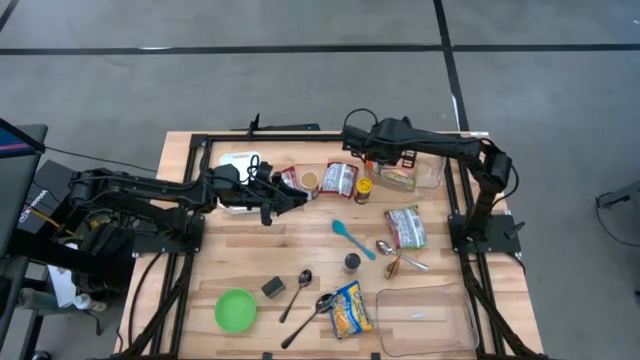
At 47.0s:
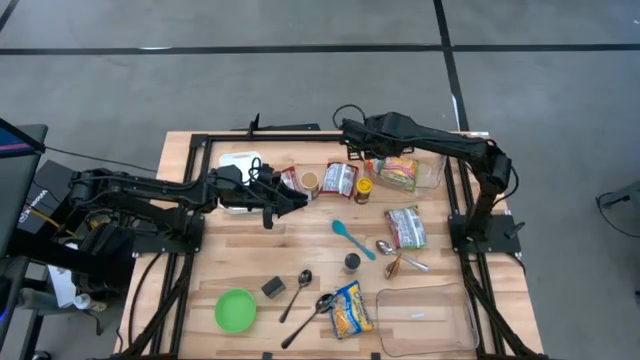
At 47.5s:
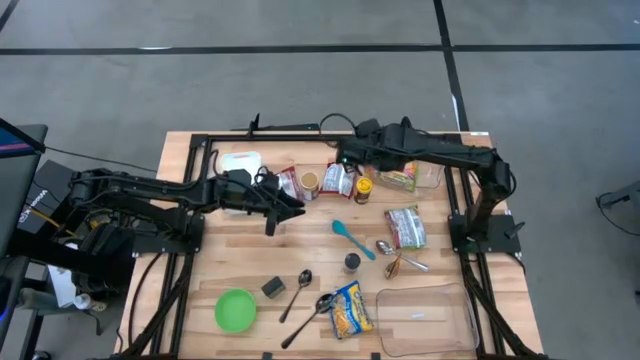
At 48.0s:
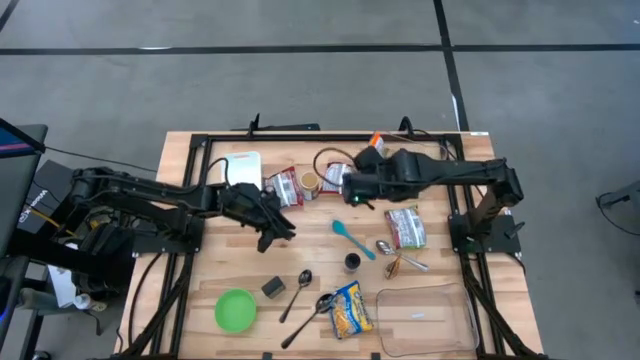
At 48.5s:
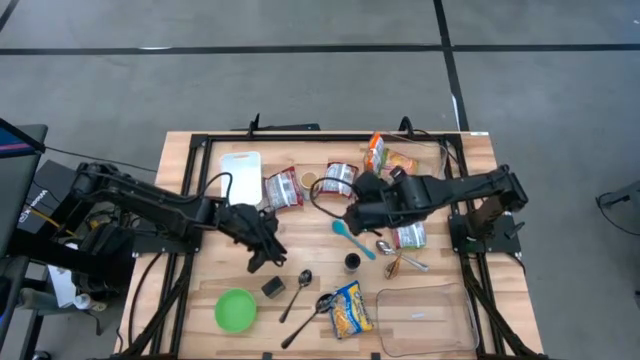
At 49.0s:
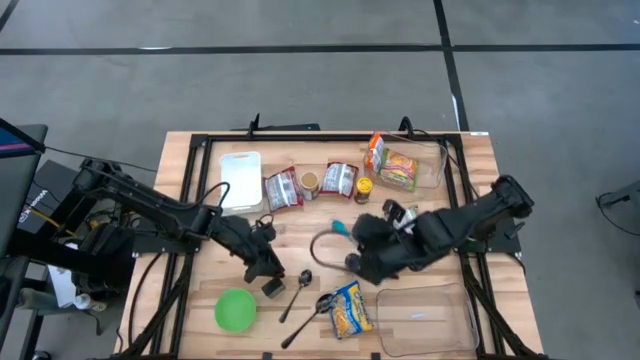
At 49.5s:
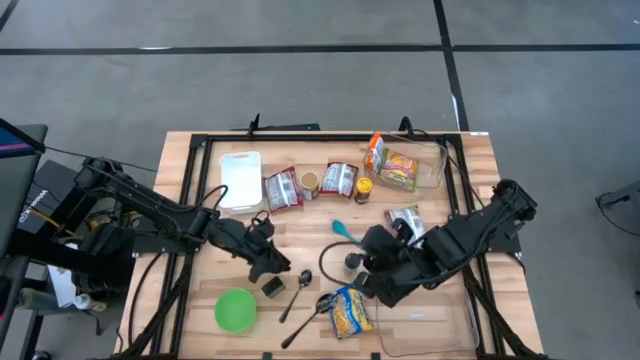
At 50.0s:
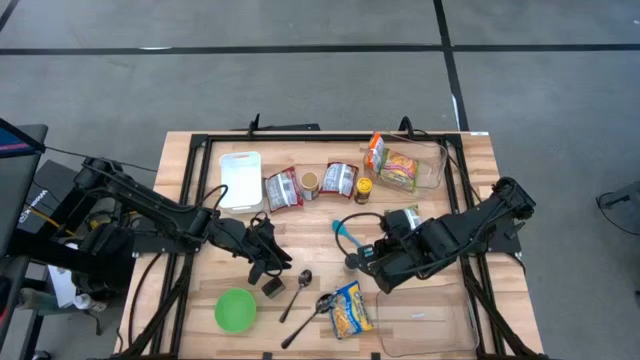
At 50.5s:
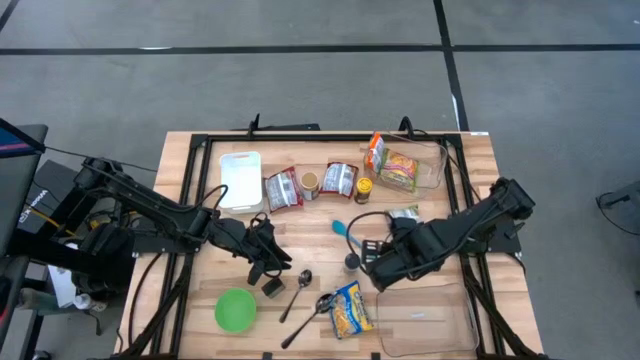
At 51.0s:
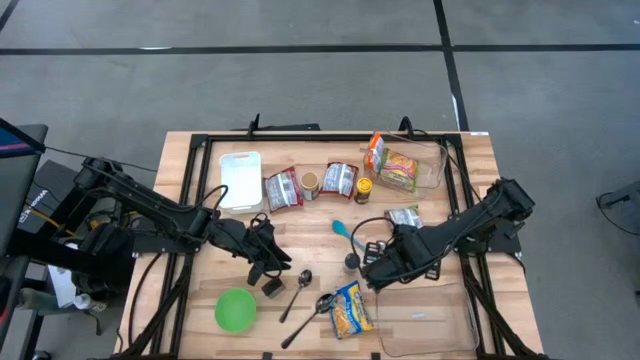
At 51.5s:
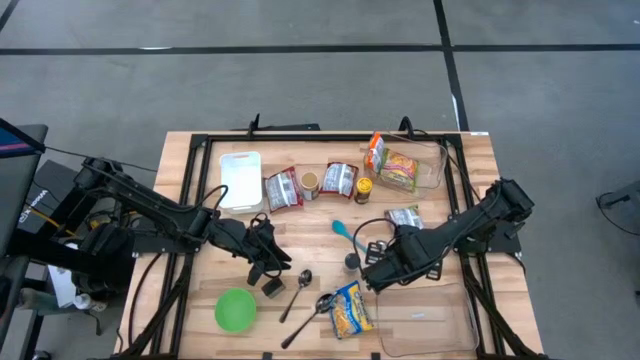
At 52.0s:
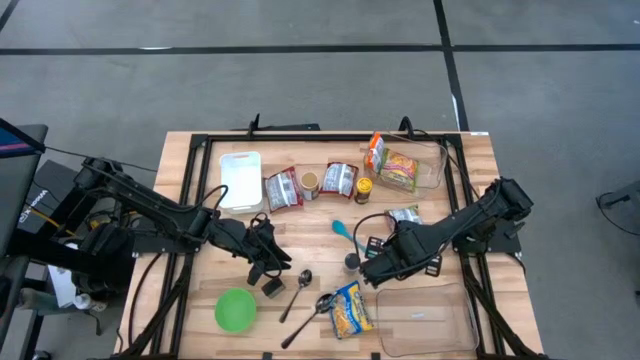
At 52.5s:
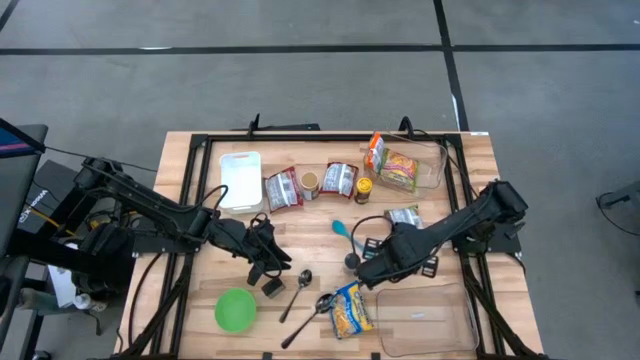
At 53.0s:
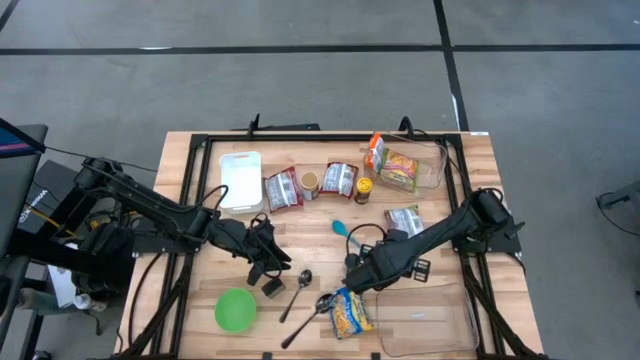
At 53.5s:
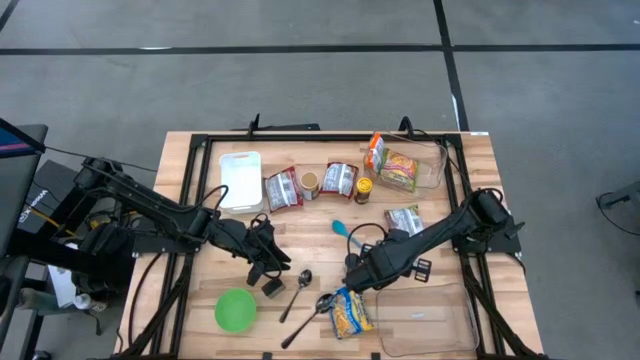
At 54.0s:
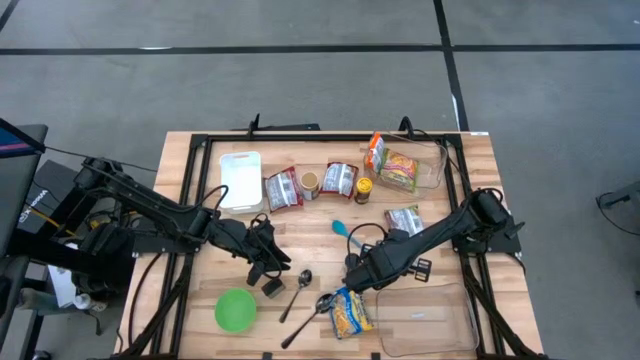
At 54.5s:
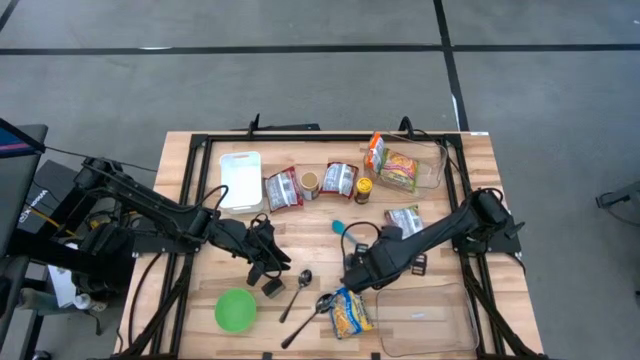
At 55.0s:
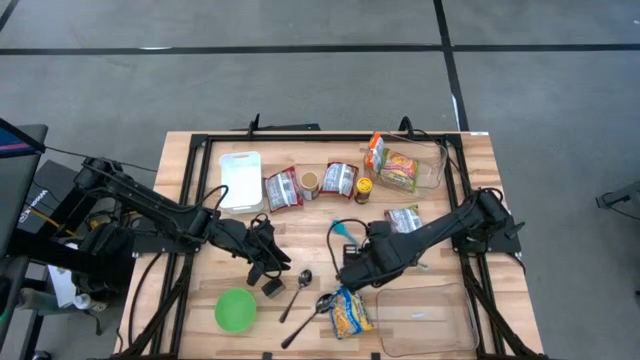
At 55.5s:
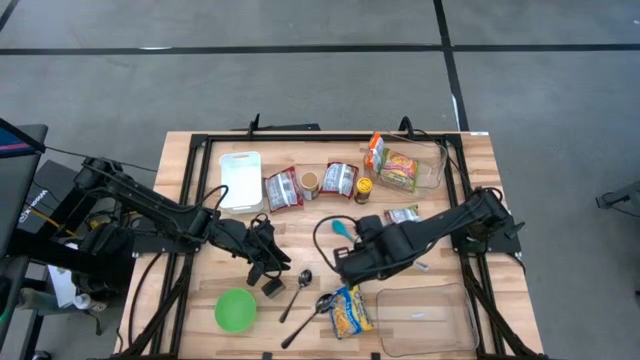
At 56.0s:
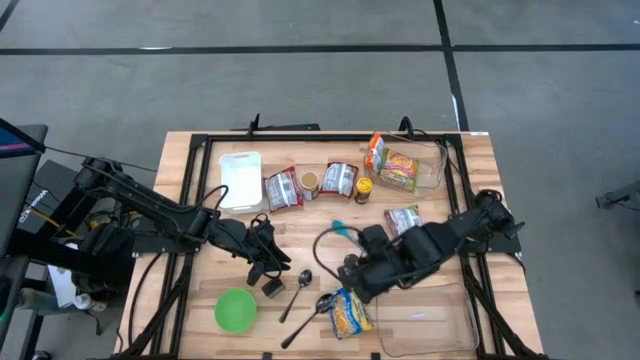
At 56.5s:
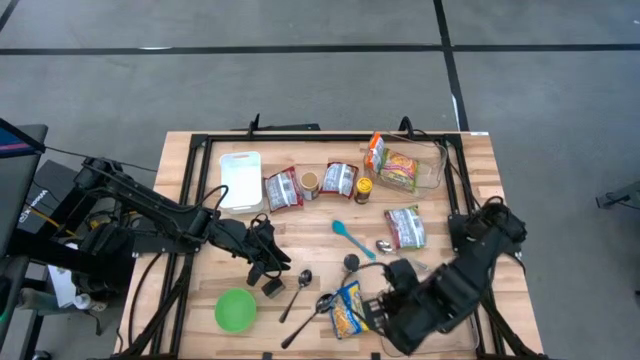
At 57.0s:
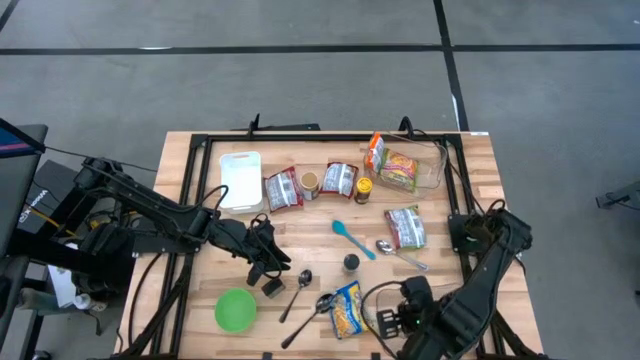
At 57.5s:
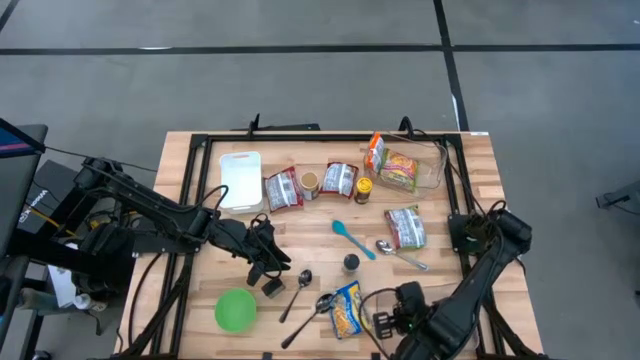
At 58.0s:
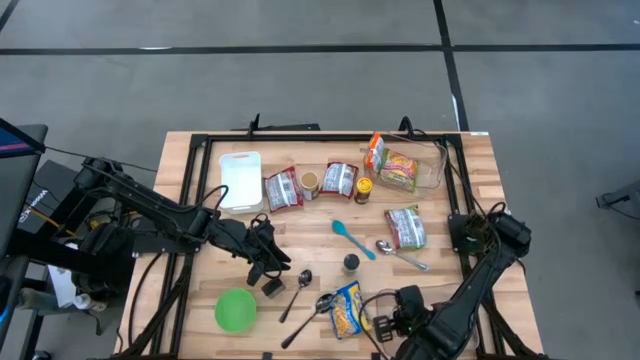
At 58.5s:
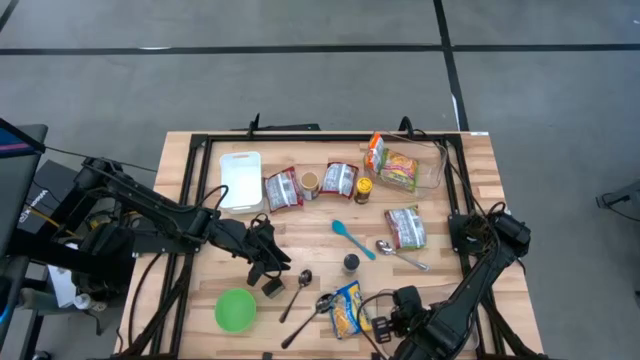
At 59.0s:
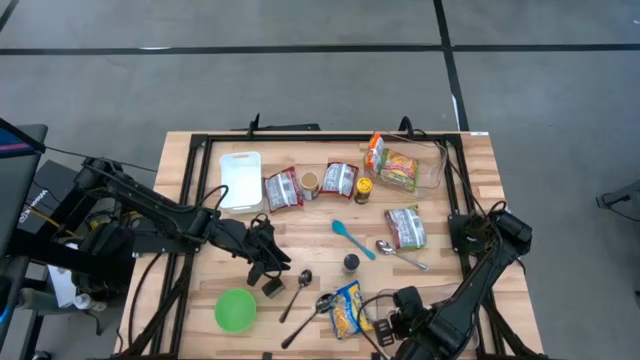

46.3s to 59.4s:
Task: Pick & Place Food Item
Put the orange spice pack into the bottom transparent bin

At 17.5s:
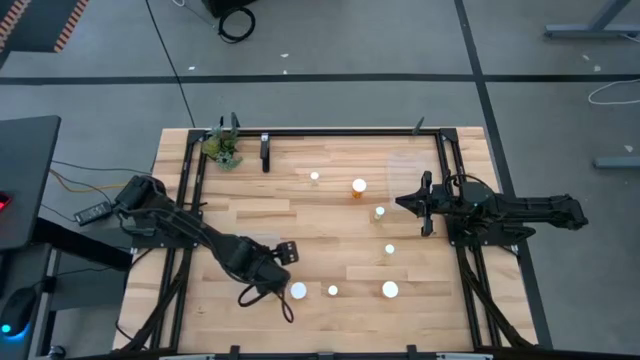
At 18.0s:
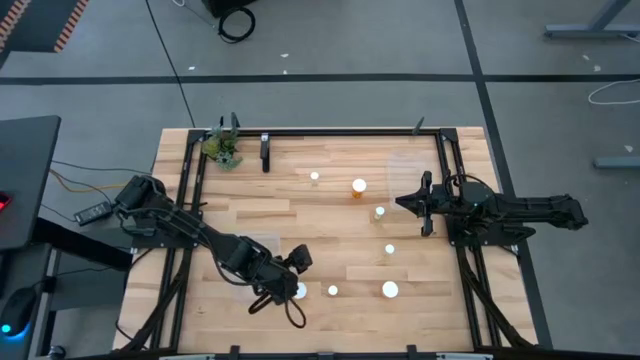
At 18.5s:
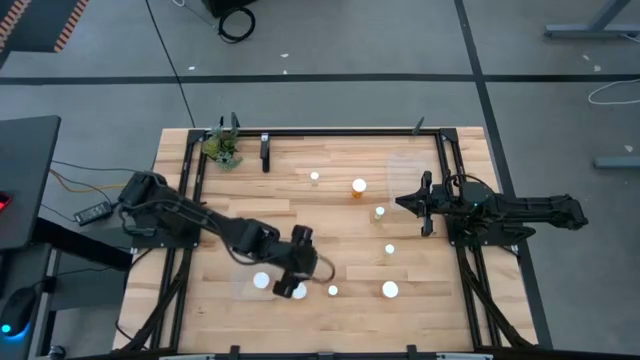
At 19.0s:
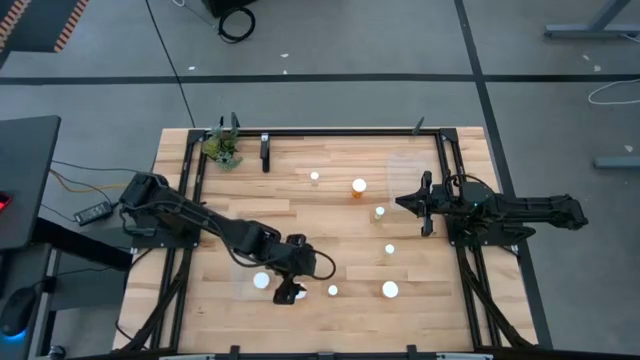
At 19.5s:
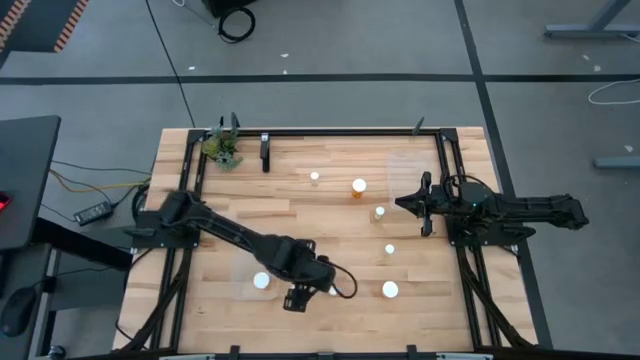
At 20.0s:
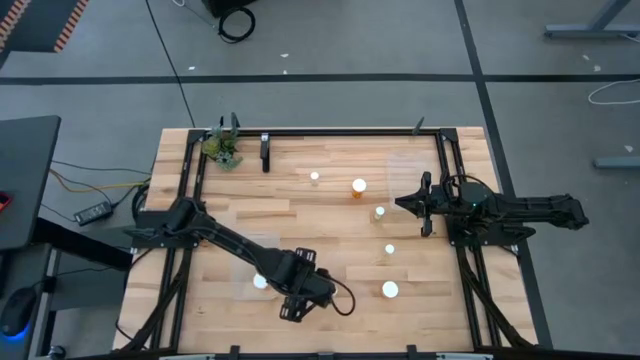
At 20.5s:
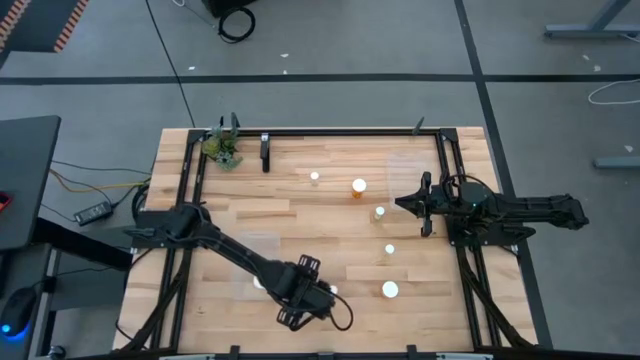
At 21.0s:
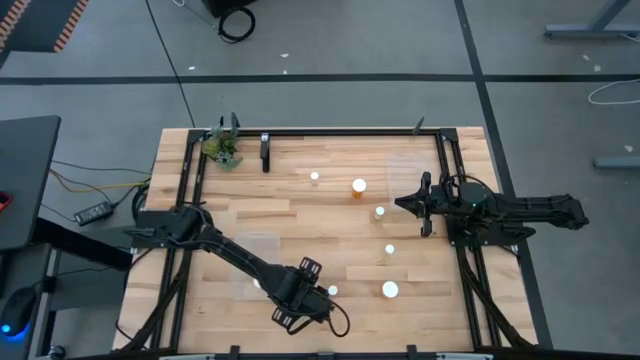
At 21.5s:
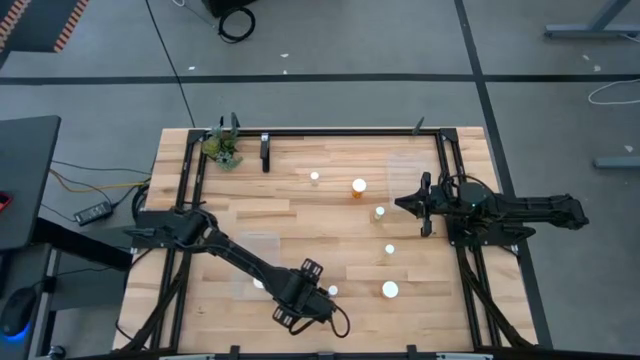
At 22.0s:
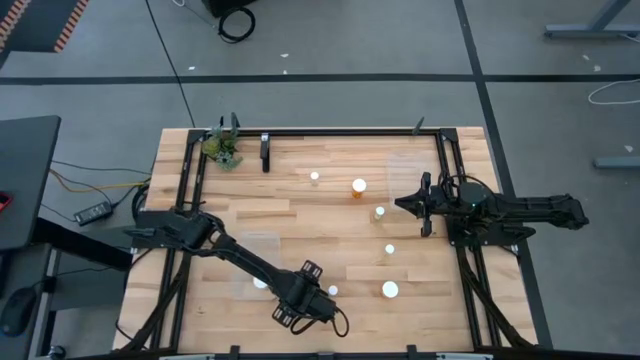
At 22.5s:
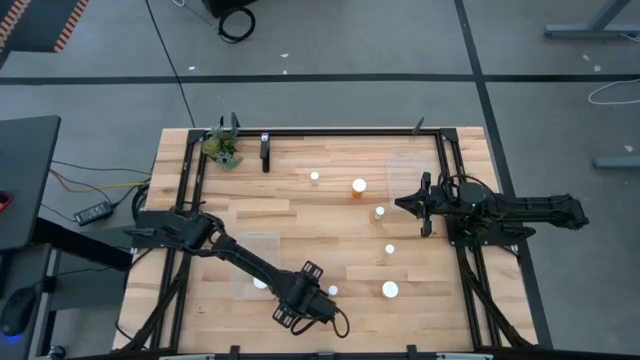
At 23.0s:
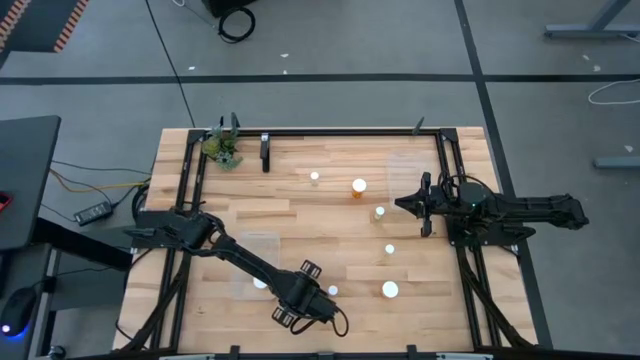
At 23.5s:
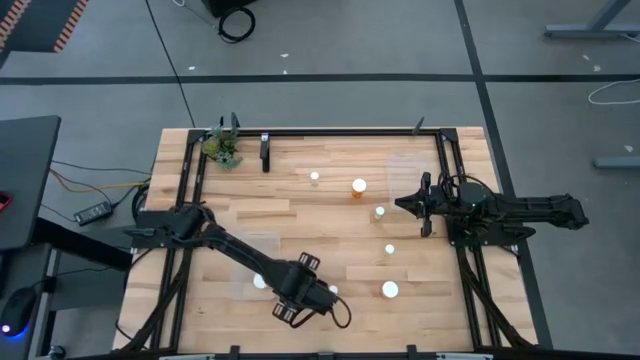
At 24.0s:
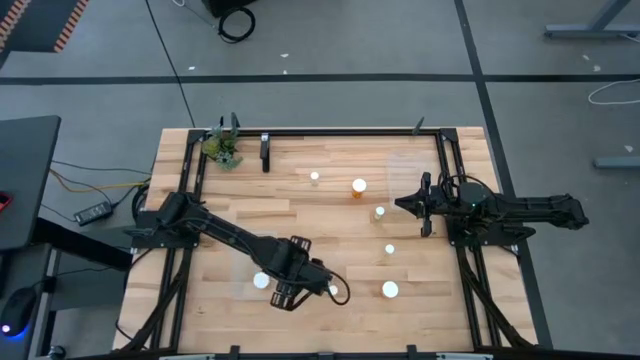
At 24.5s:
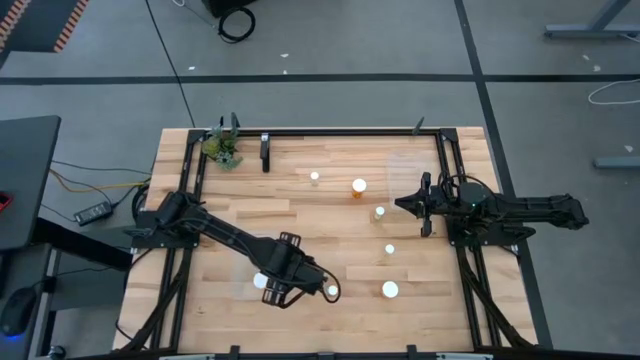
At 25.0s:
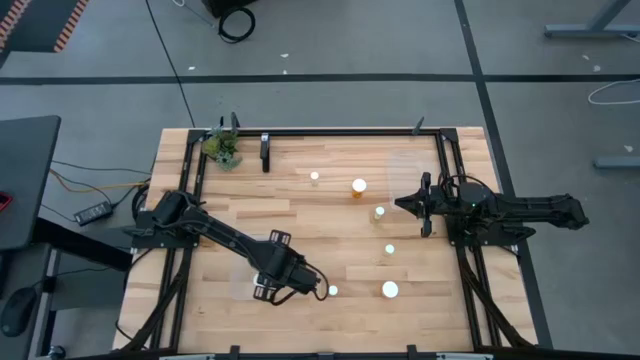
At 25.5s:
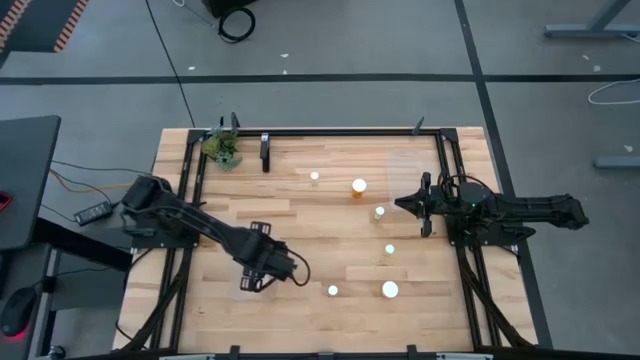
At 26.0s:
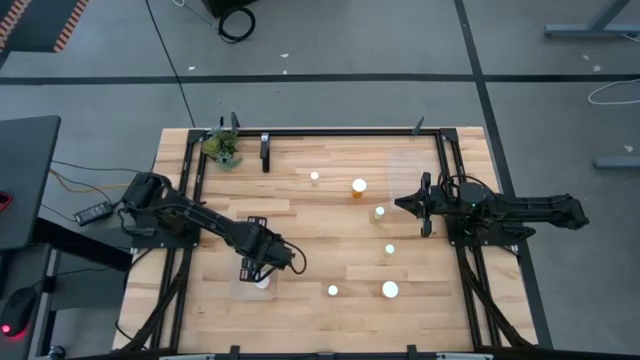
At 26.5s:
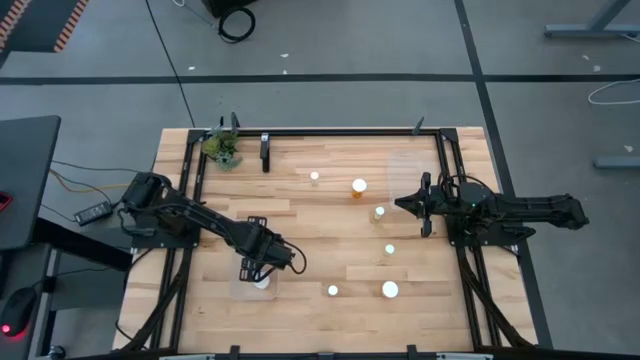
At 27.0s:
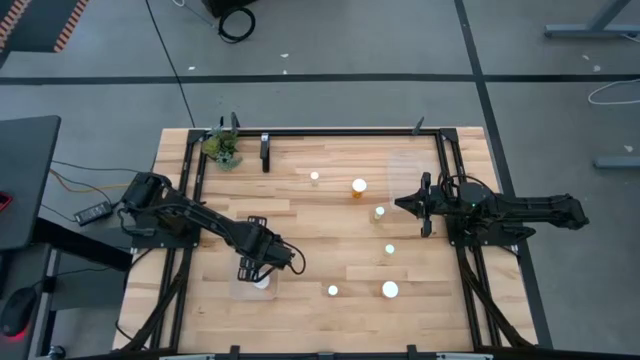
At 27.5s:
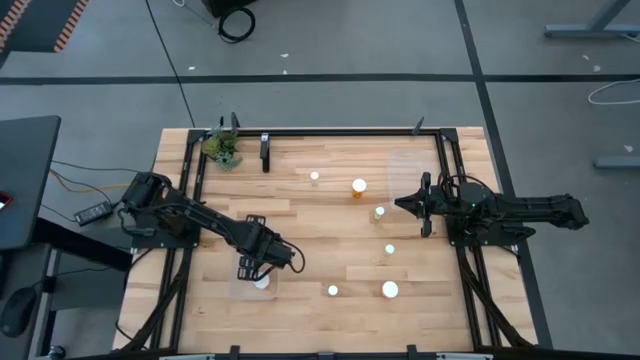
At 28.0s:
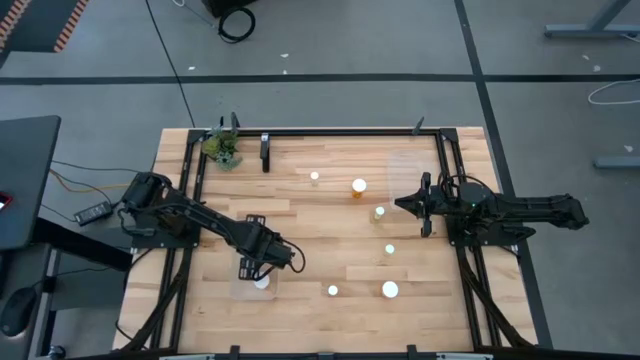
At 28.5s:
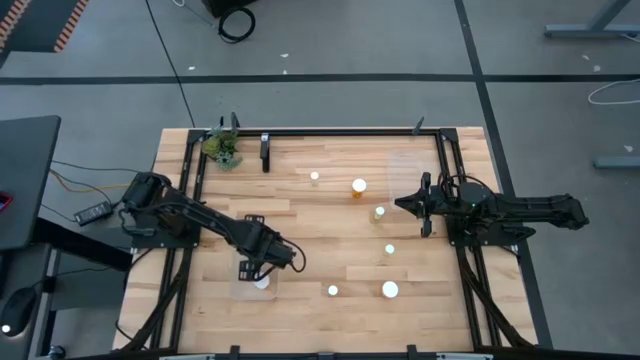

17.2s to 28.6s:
Task: Pick and place medicine bottles into bin by pill shape (circle, oval)
Put the large orange pill bottle into the bottom transparent bin
